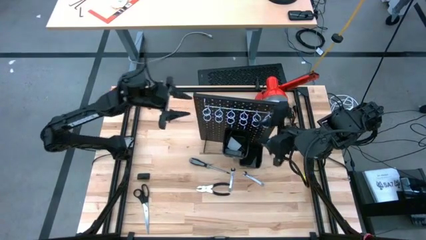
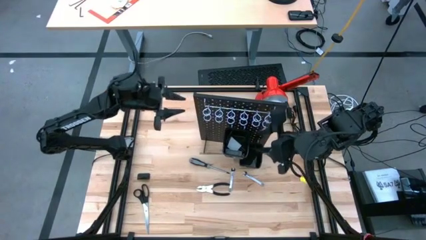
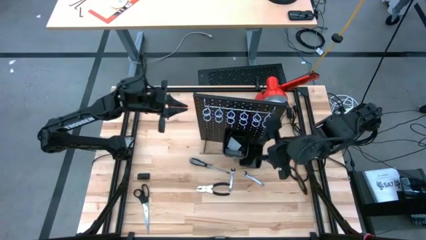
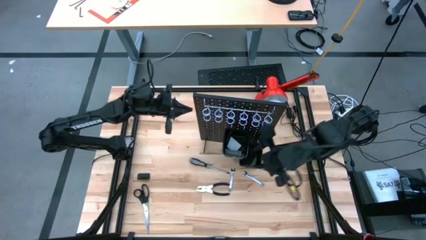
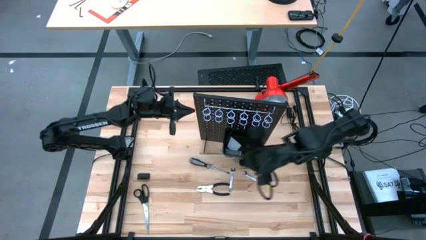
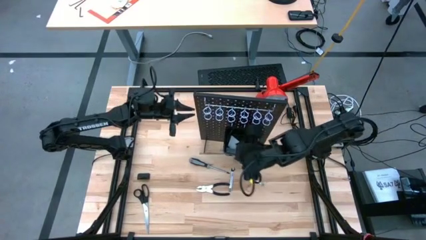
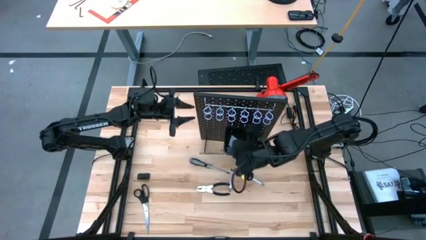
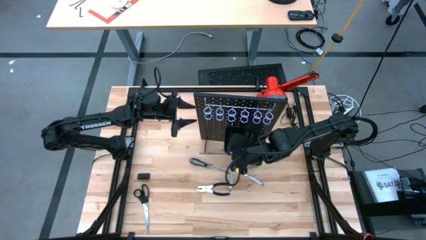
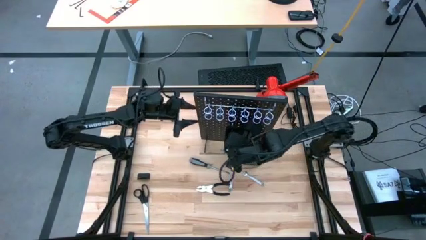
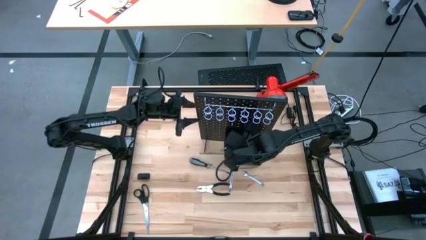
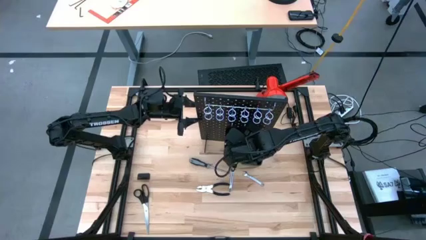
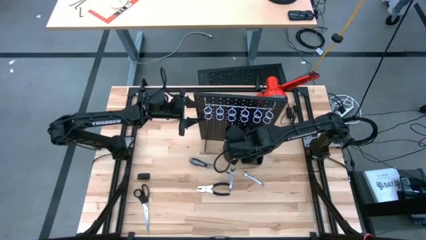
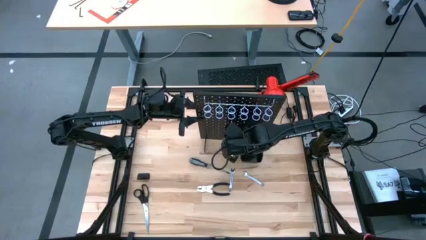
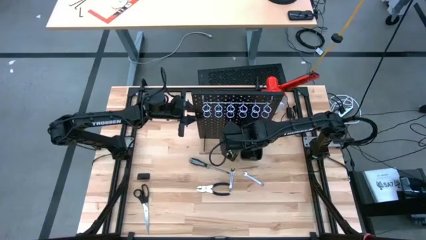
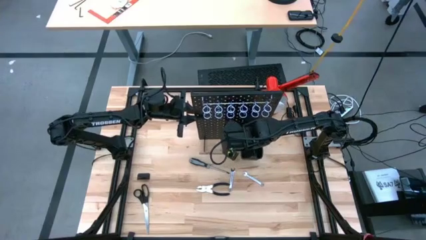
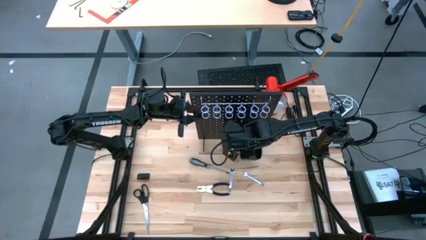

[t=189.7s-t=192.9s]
Task: Hang tools onto peg board
Remove the allen wrench from the black bin on the pegboard

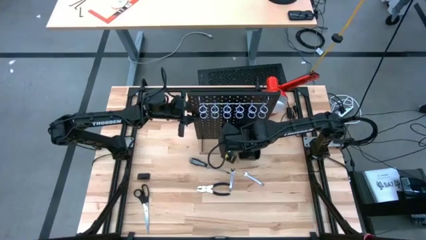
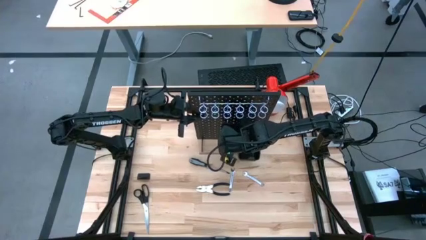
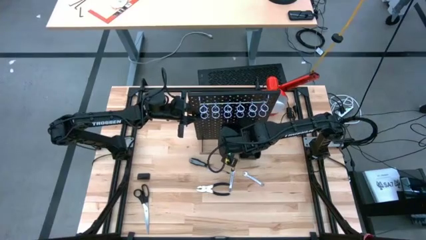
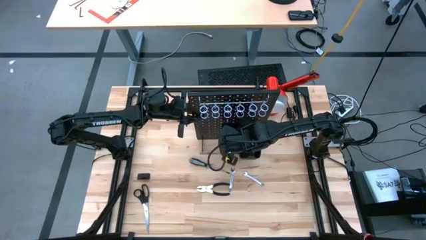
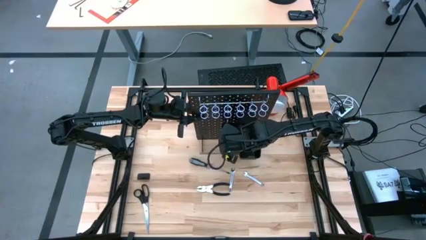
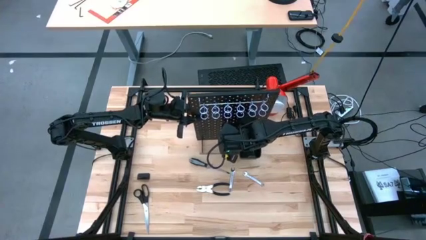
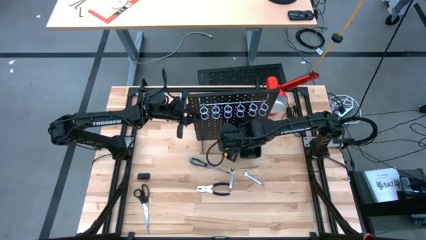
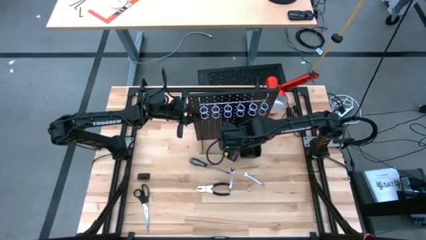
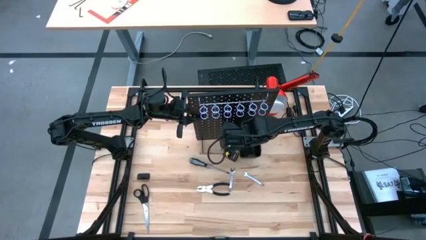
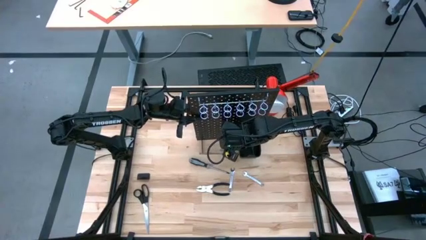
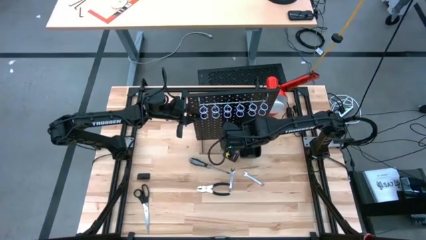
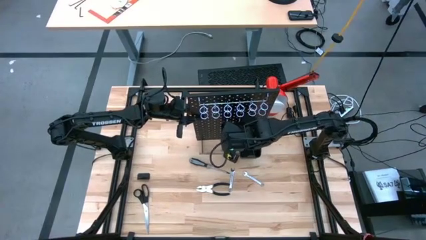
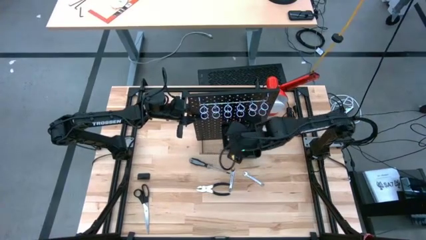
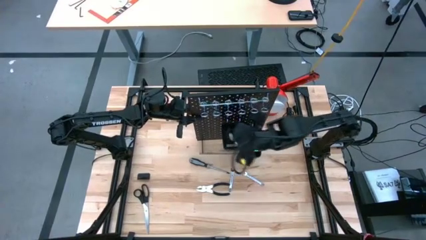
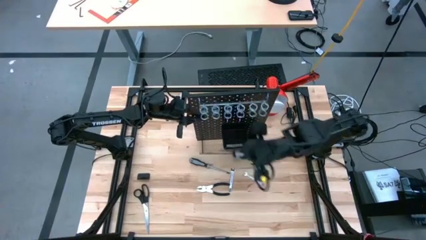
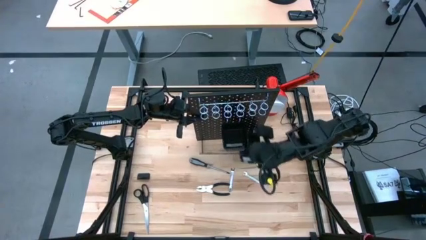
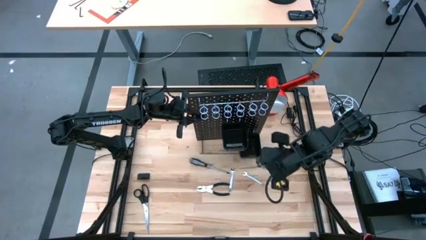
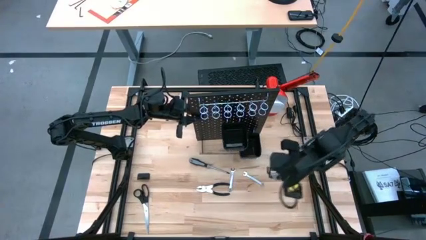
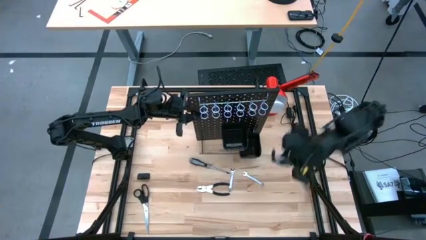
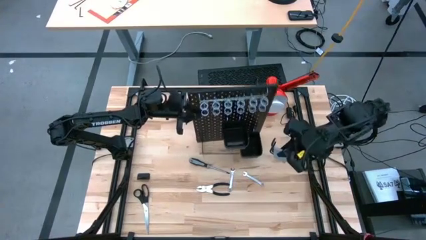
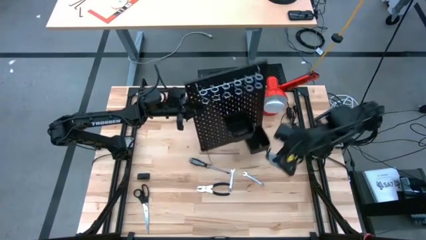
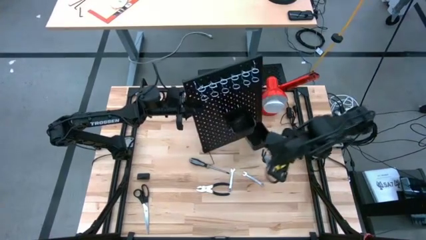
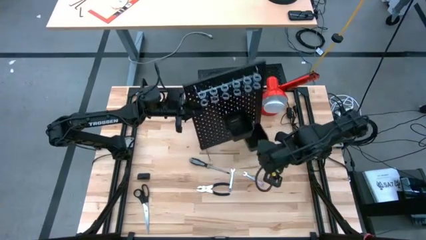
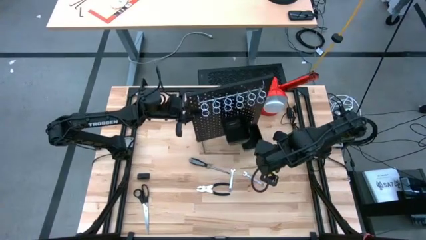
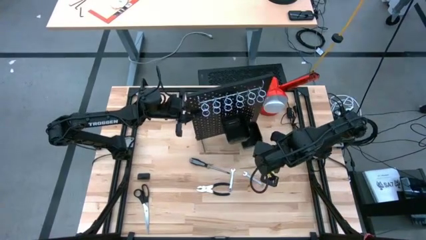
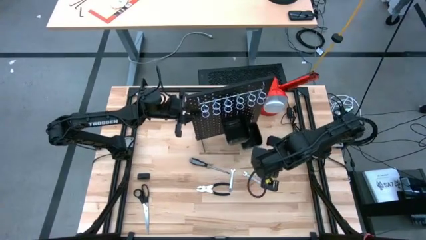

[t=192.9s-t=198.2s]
Remove the allen wrench from the black bin on the pegboard

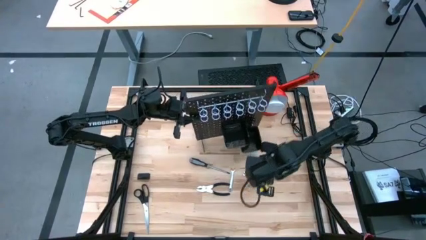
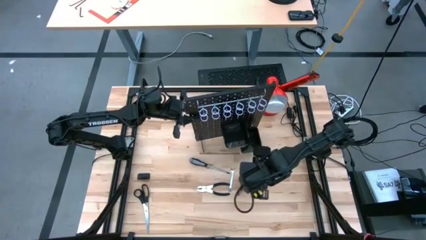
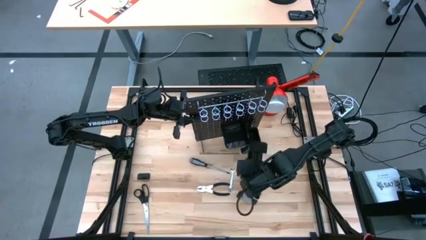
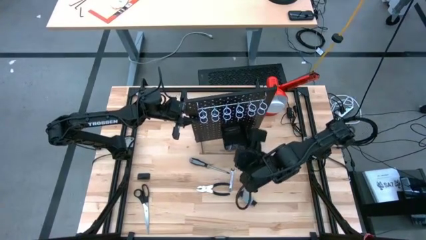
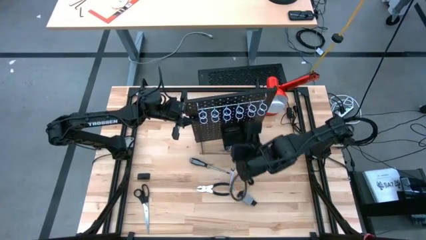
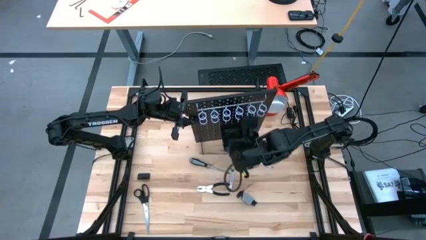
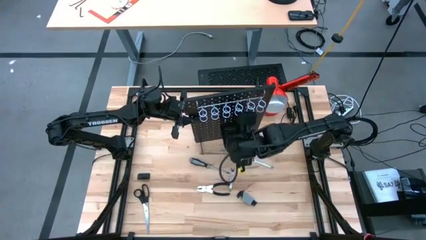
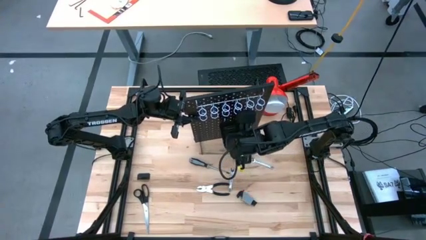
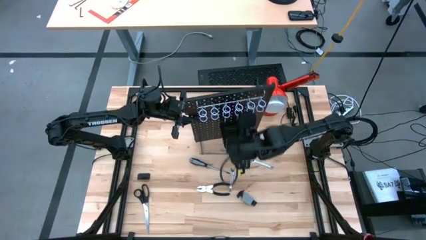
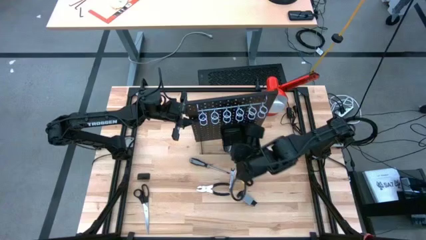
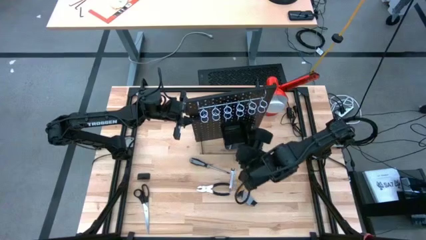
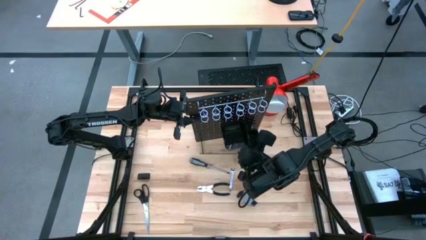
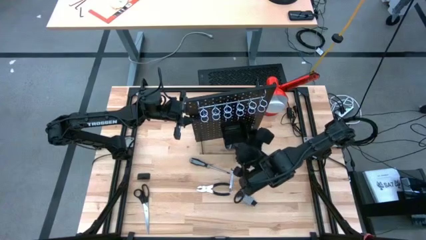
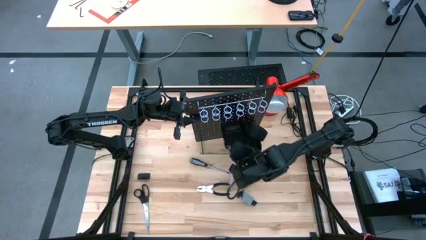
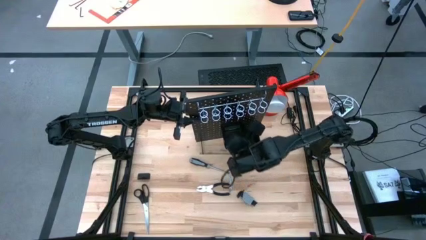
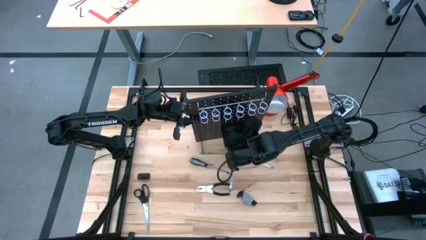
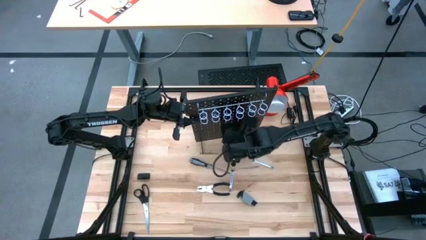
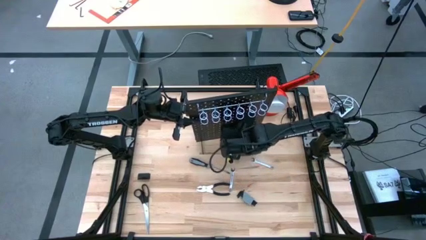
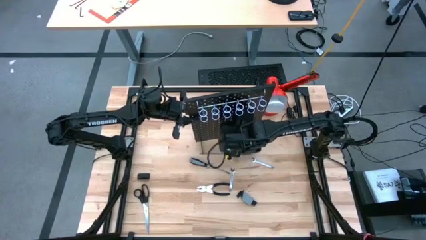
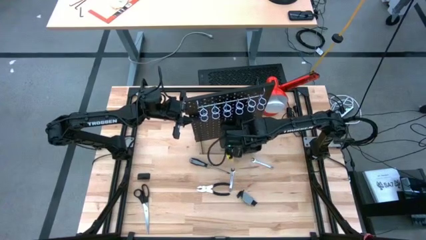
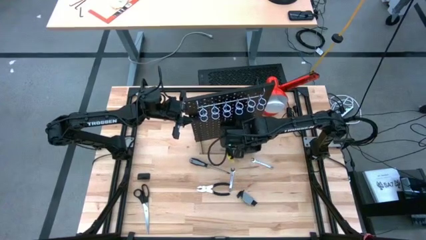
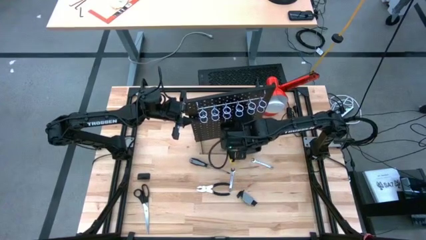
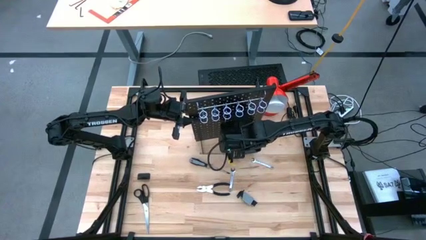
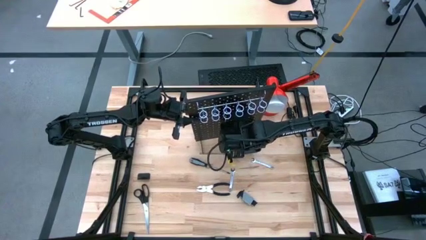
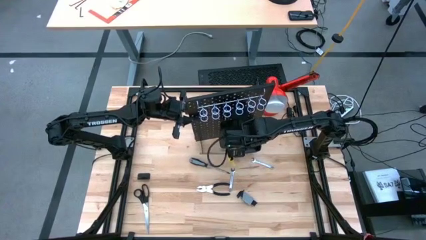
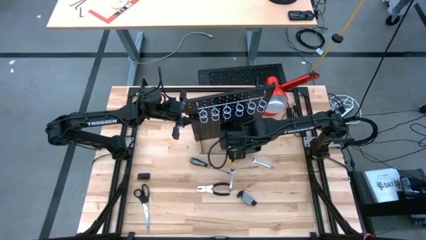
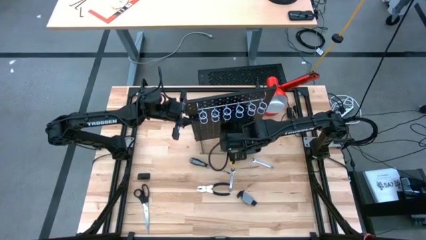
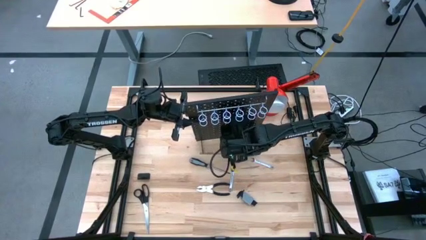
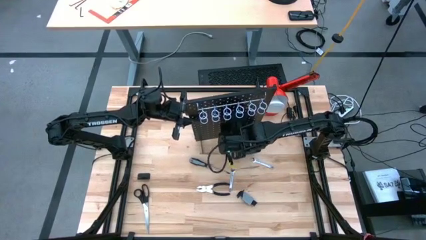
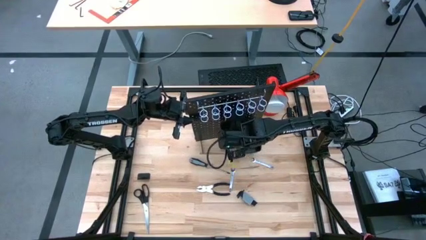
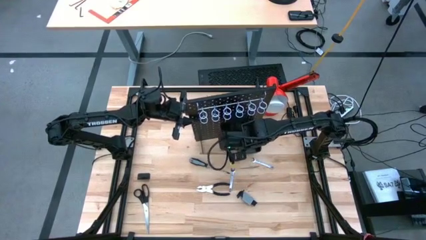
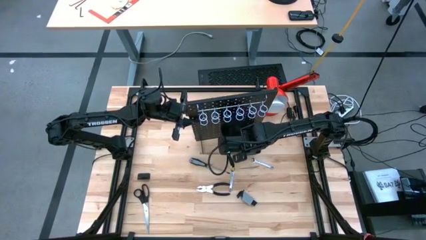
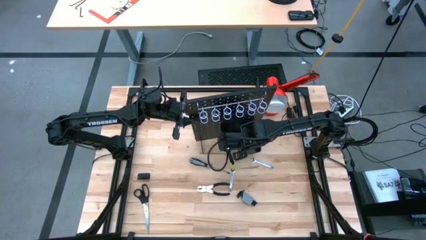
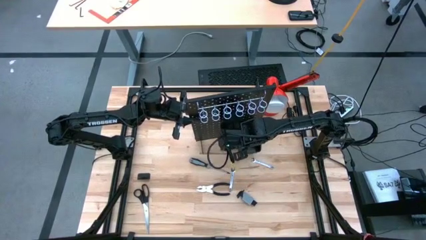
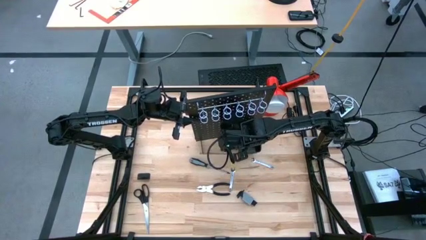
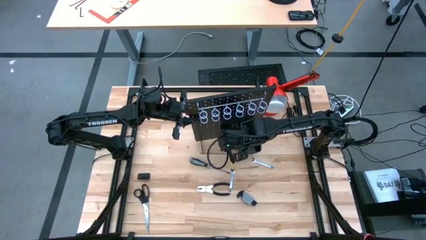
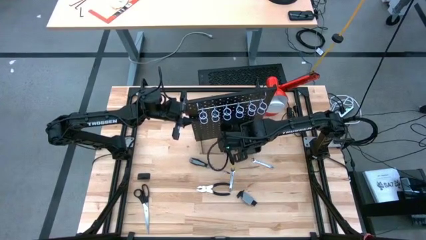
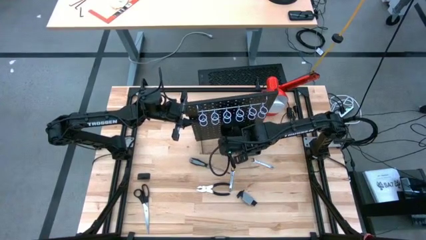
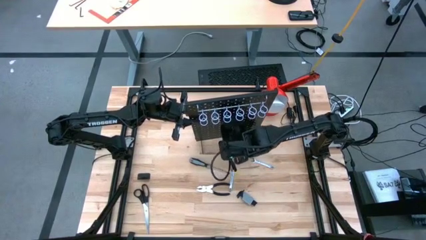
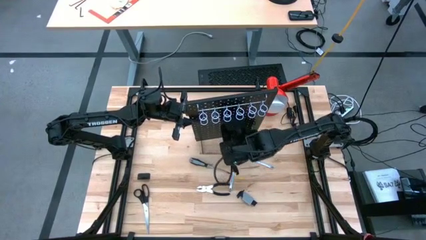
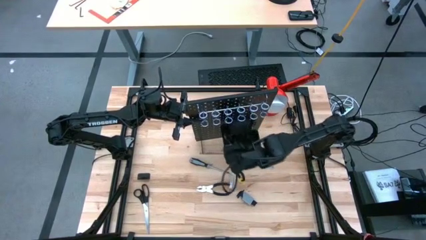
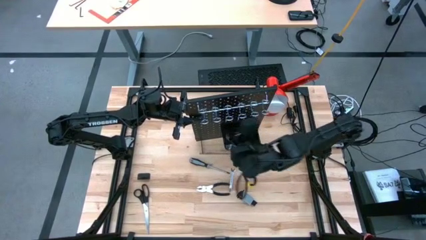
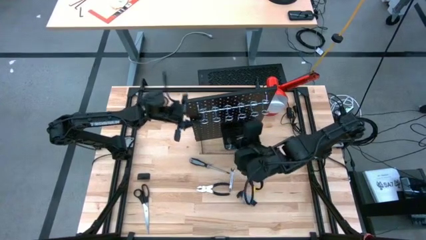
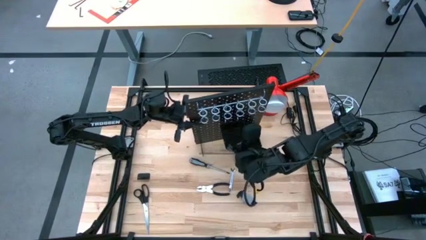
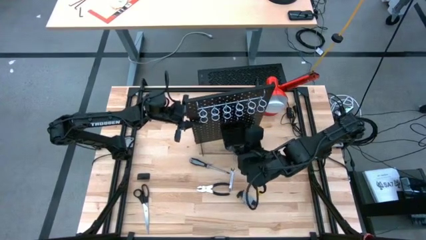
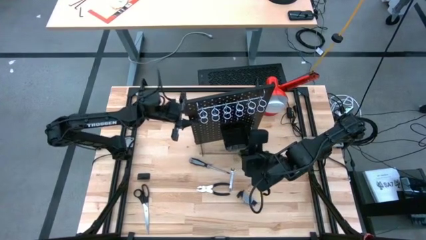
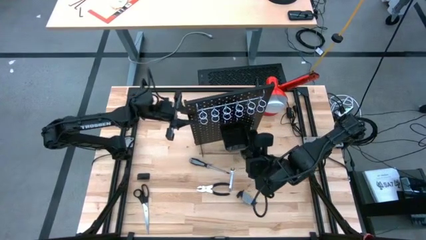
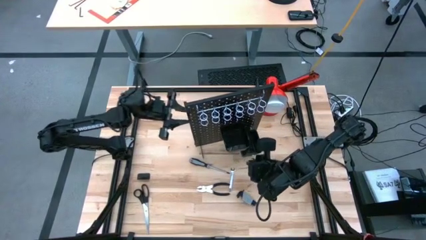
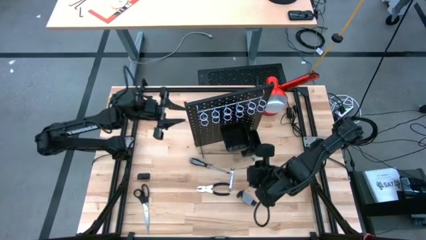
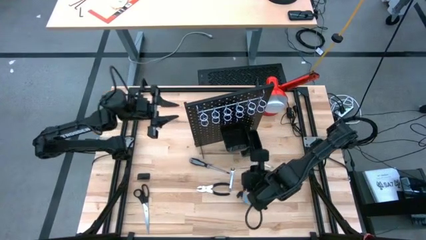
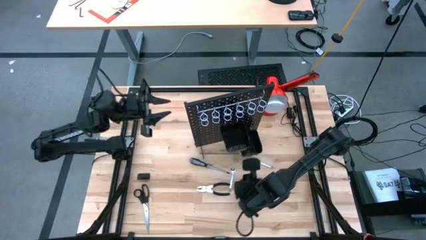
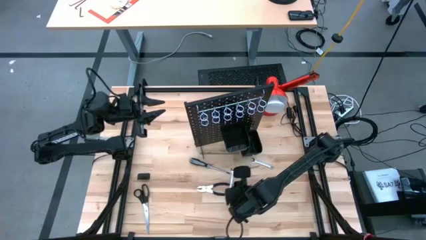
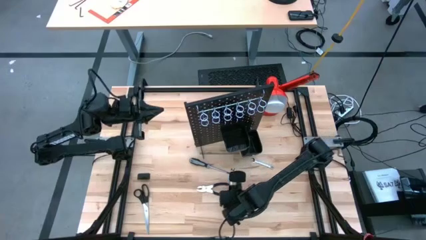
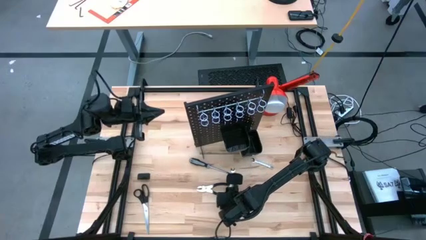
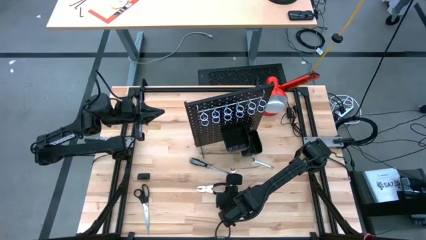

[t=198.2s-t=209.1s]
Remove the whetstone from the black bin on the pegboard
